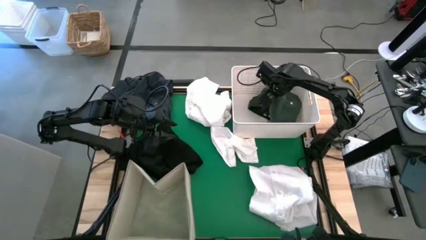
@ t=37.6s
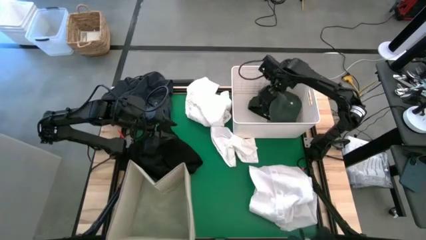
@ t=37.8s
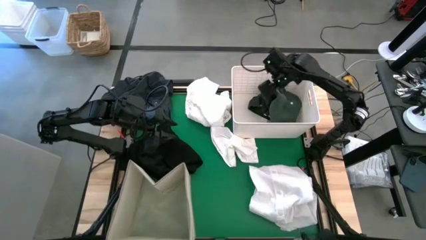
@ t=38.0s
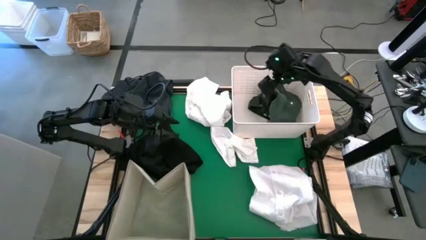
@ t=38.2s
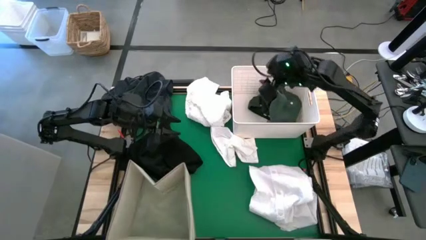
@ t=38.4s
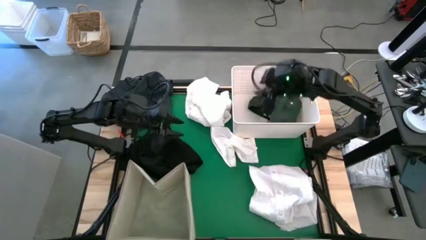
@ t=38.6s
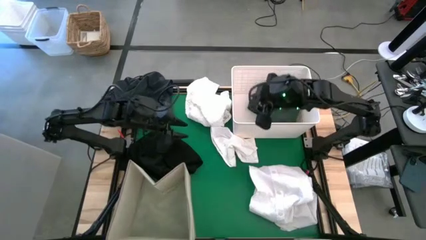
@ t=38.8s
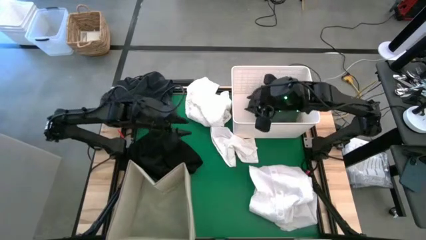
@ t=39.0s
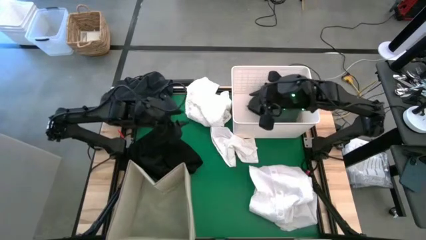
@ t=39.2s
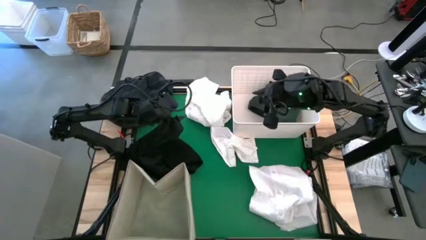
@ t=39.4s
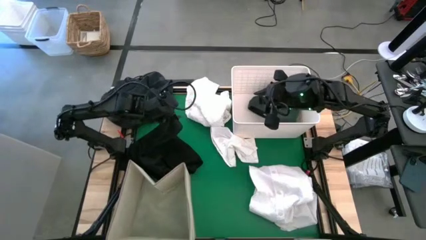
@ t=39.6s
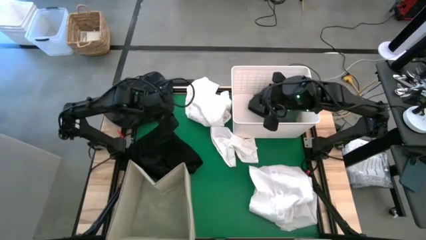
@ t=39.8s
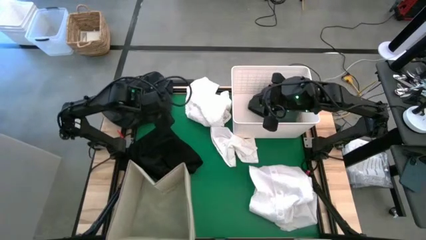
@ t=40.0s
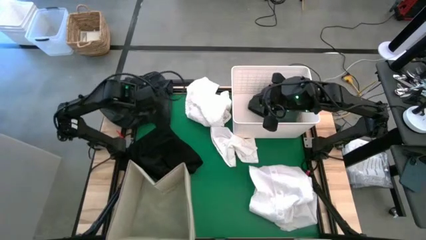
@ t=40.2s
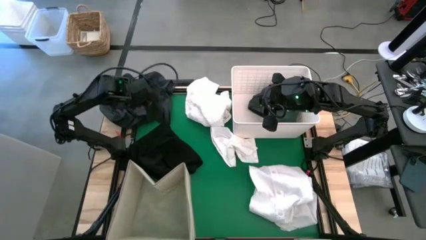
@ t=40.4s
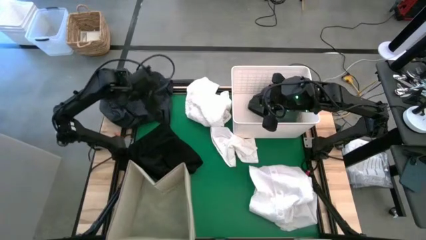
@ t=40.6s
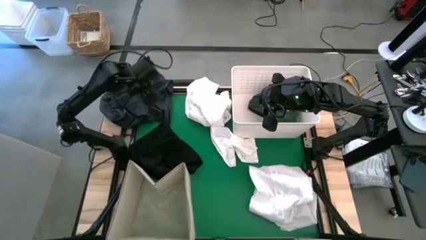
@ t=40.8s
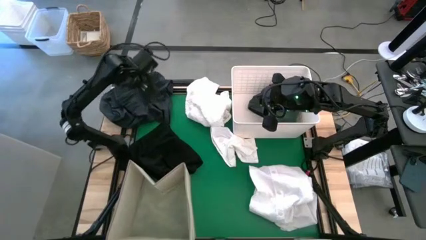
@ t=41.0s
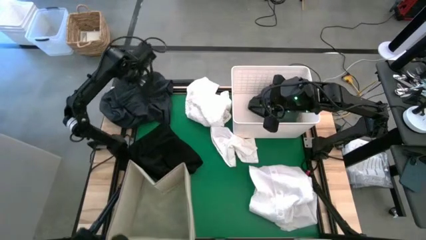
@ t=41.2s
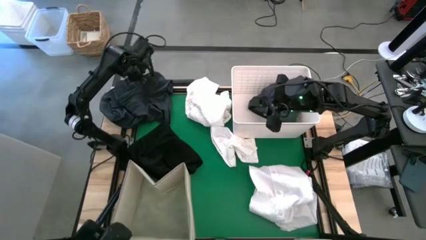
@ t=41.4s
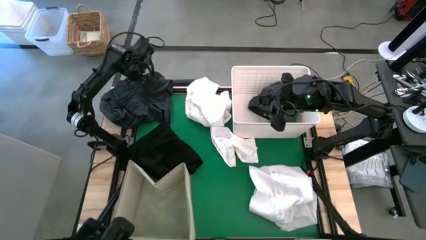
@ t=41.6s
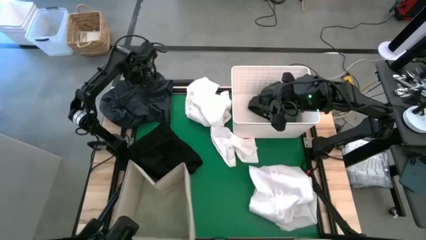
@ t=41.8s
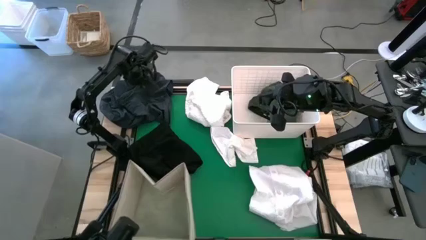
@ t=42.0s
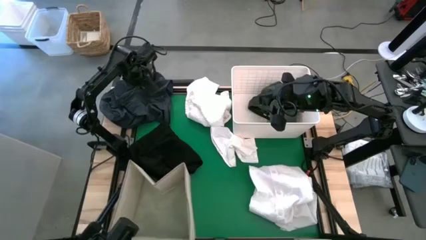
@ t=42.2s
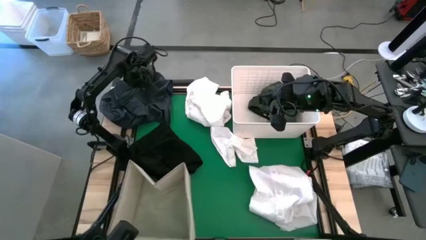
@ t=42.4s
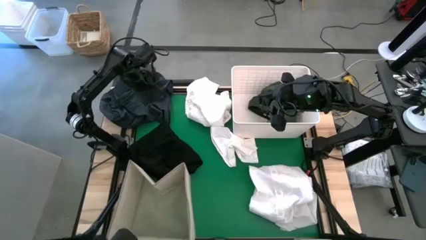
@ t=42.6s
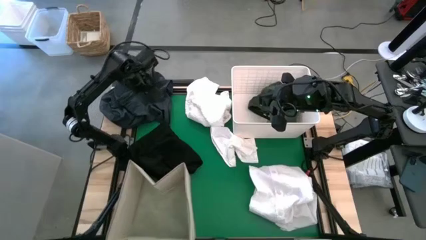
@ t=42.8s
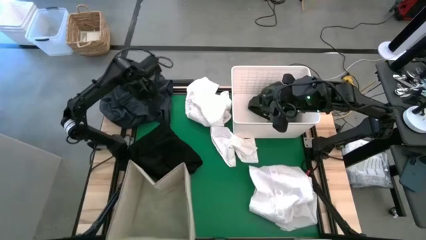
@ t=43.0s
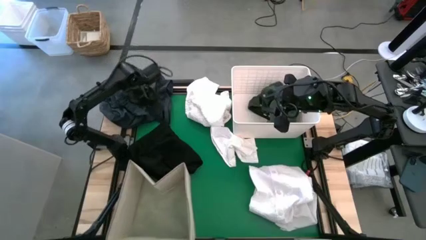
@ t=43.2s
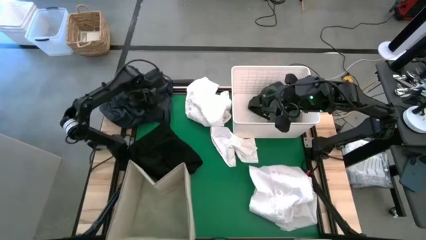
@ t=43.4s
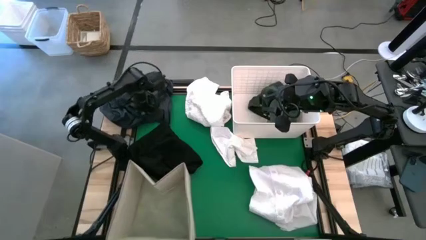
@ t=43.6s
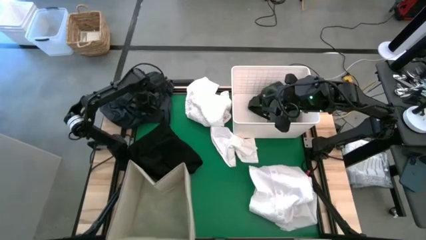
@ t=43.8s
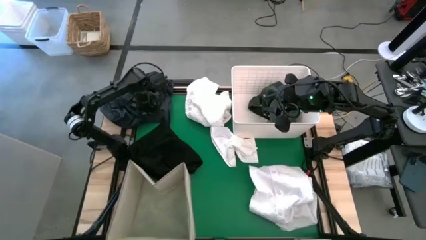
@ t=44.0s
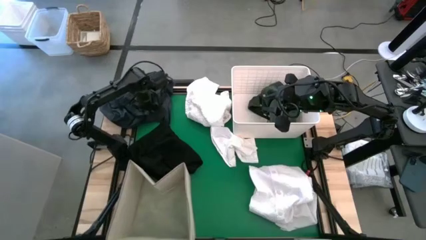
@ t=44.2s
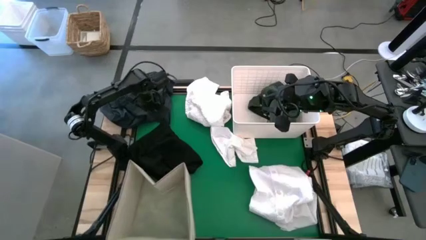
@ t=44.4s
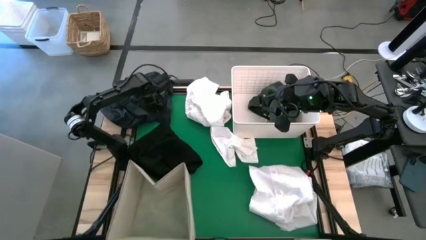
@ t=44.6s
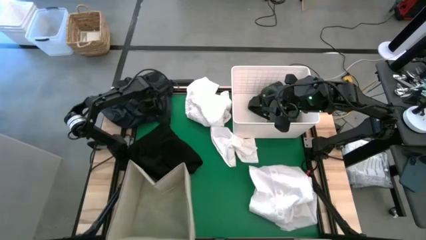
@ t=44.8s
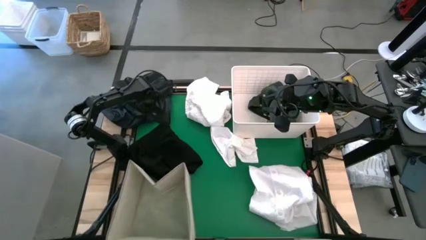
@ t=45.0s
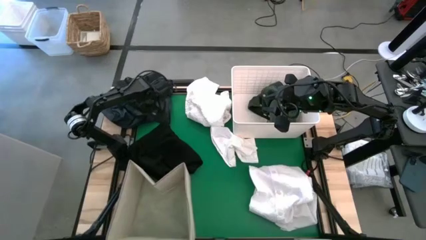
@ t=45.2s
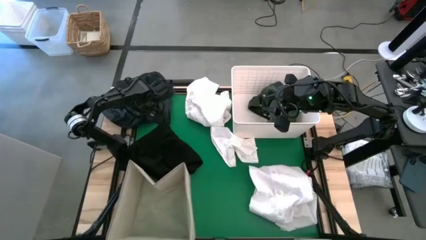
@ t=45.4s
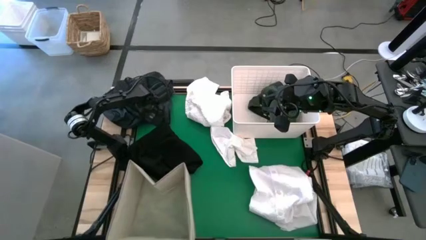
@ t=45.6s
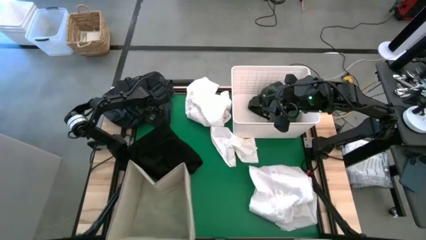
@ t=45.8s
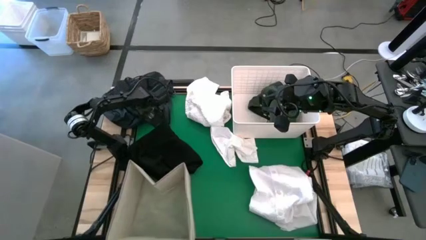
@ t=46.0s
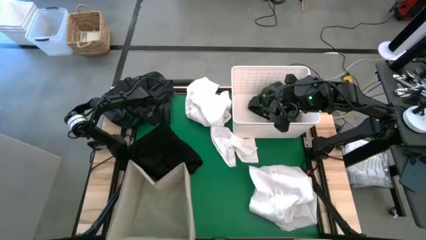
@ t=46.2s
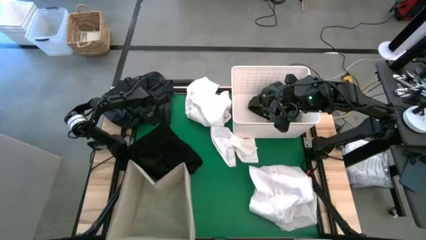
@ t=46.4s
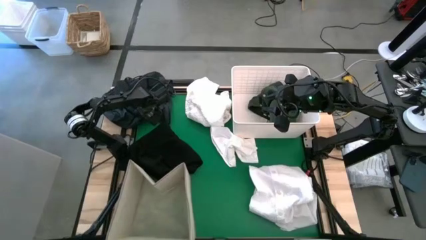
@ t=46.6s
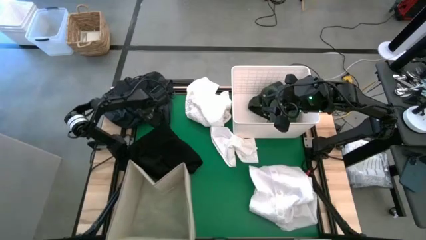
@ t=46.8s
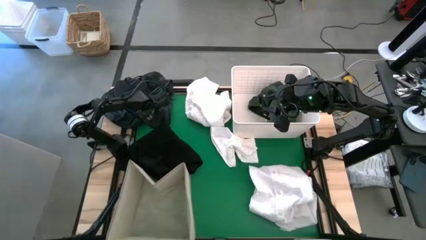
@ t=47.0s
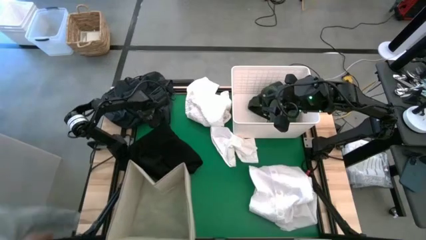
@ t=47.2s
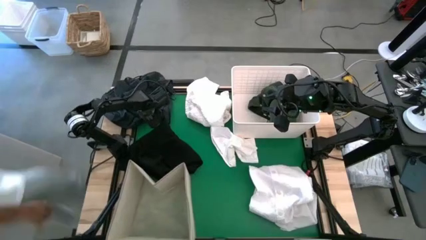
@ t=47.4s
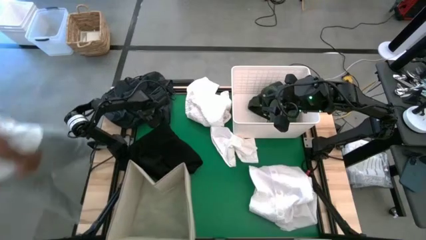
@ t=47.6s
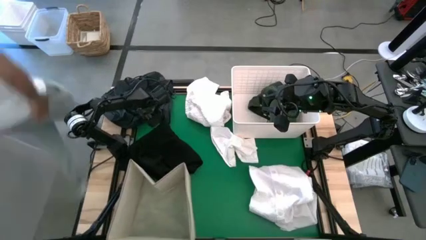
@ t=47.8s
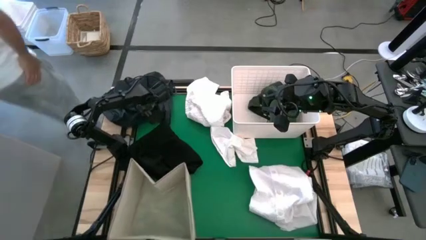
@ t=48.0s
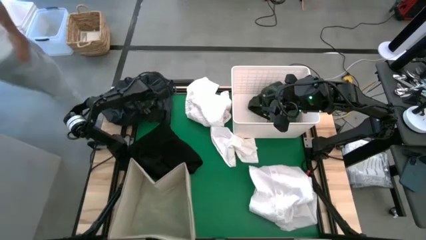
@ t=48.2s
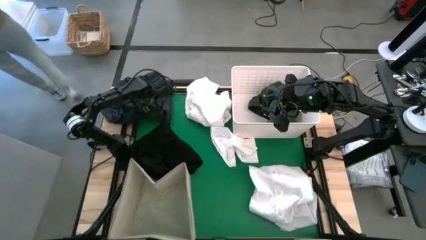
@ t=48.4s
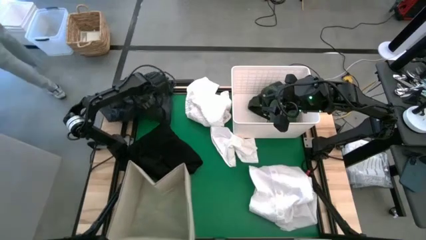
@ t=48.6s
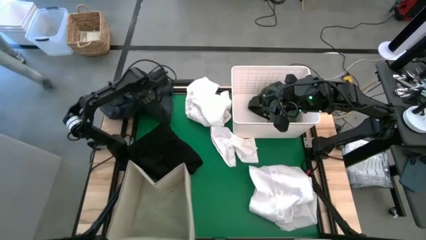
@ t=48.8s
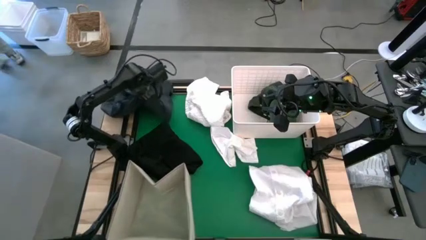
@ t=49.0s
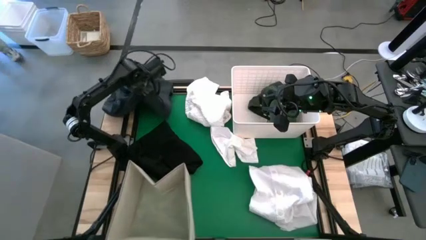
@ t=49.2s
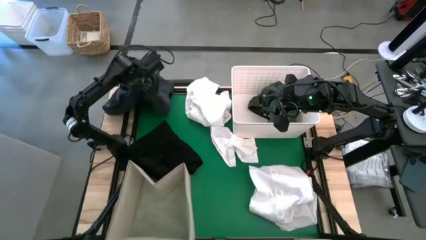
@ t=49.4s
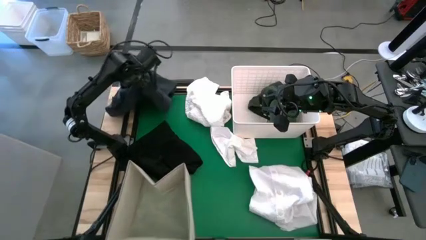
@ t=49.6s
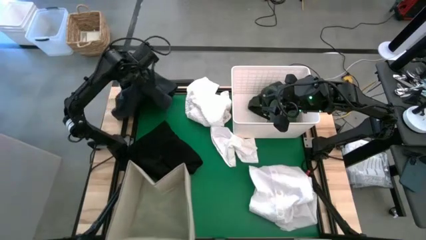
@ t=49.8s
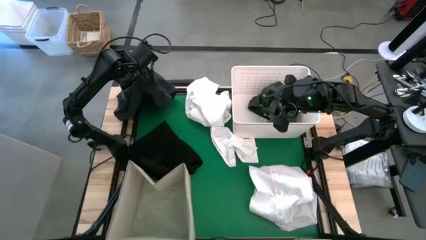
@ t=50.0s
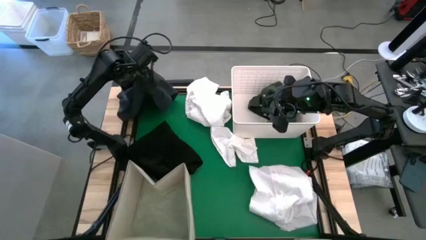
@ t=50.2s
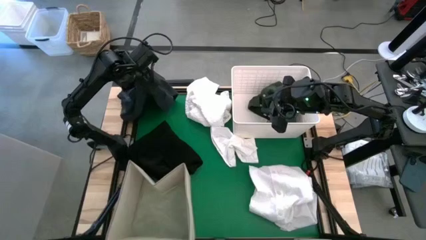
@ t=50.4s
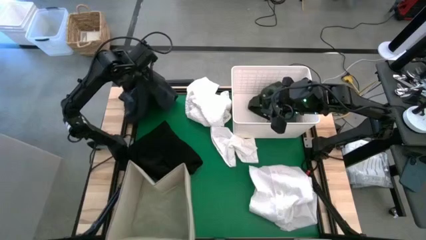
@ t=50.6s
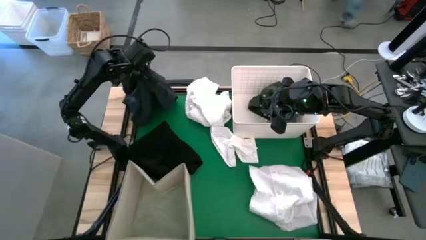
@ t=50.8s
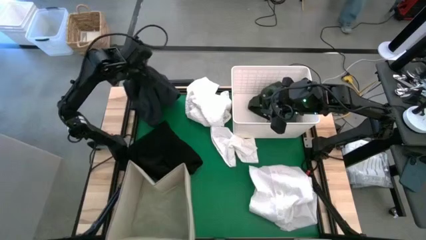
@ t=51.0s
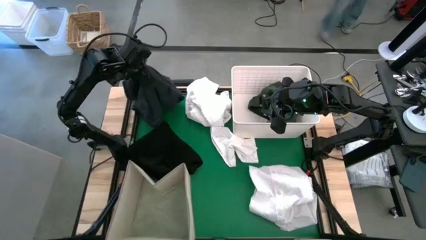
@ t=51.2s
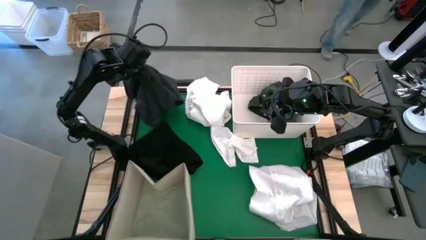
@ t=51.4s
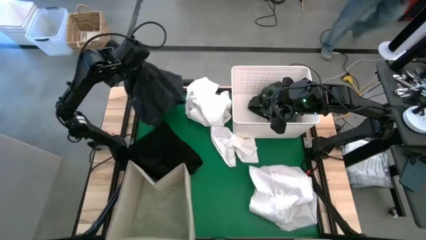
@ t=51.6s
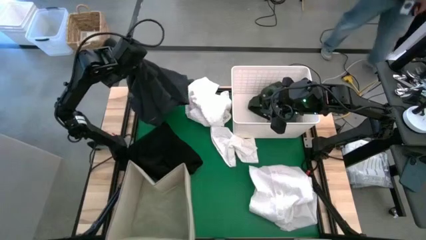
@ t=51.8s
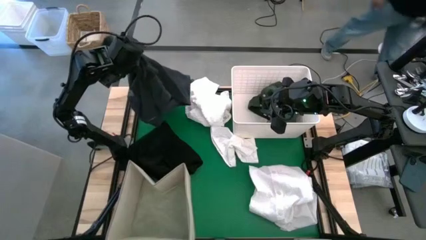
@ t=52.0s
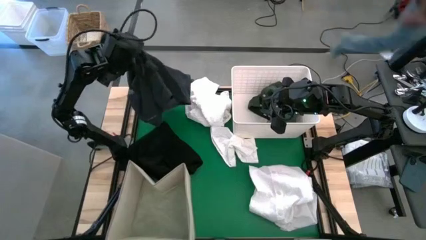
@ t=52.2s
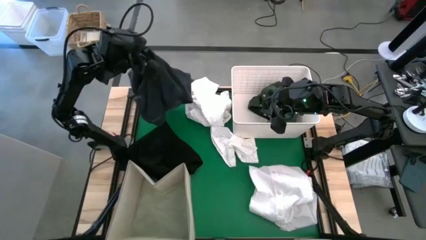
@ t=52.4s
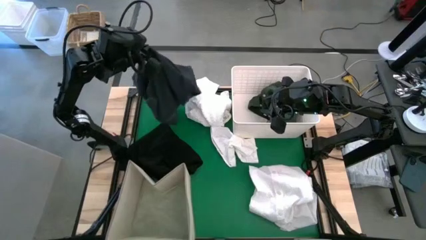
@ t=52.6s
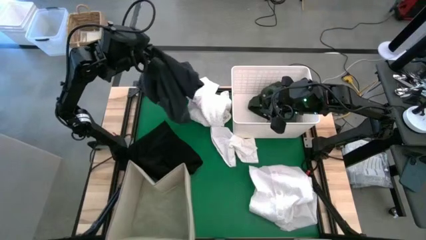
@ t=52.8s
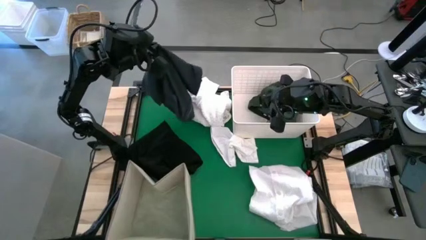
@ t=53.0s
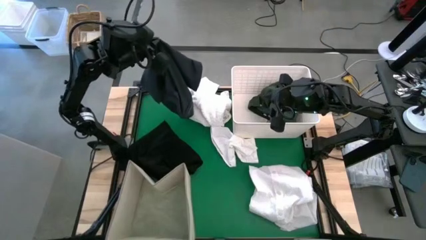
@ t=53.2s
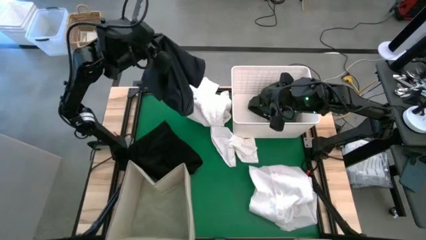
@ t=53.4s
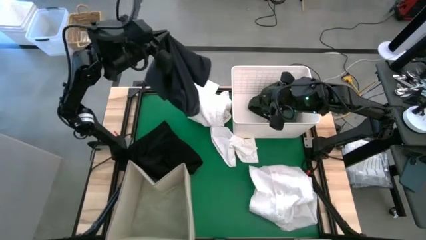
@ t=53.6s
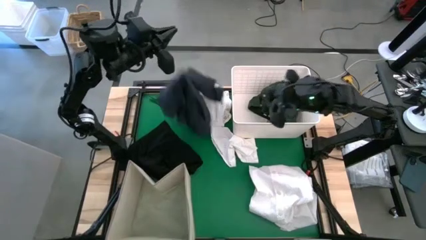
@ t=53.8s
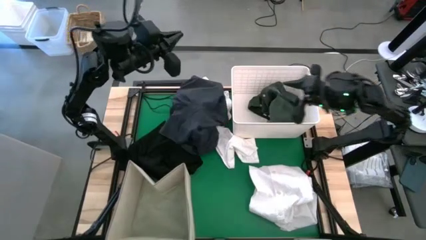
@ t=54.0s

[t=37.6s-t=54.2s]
Task: Sort clothes
Put the black shorts into the top right white bin
